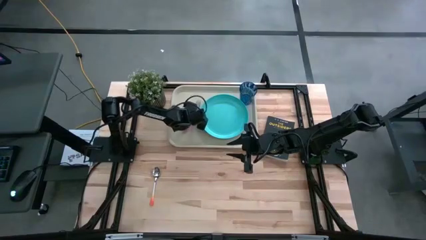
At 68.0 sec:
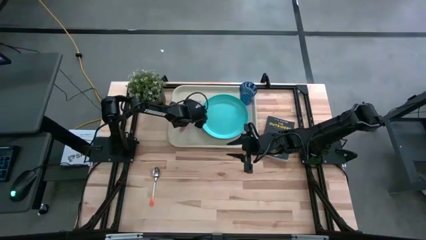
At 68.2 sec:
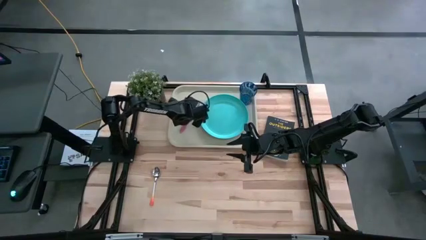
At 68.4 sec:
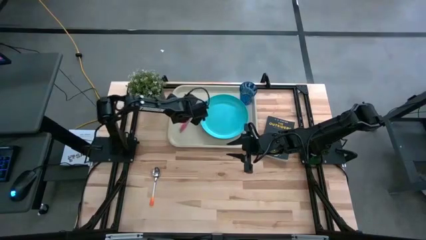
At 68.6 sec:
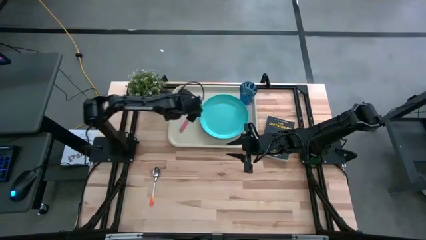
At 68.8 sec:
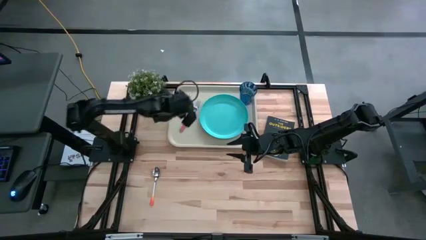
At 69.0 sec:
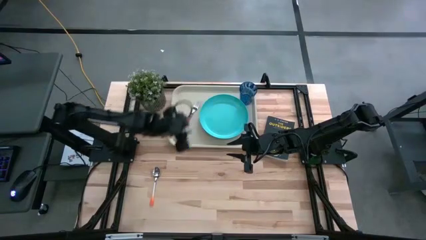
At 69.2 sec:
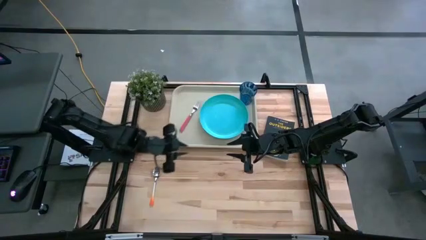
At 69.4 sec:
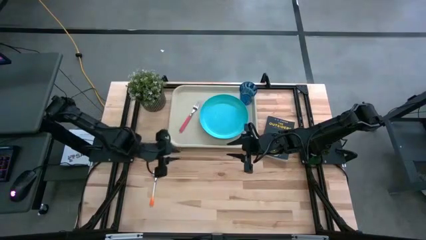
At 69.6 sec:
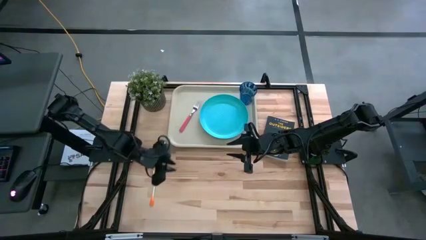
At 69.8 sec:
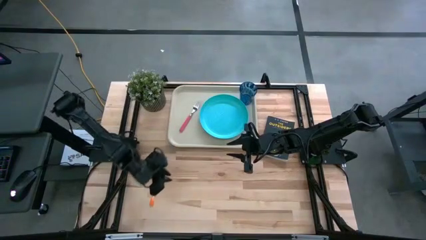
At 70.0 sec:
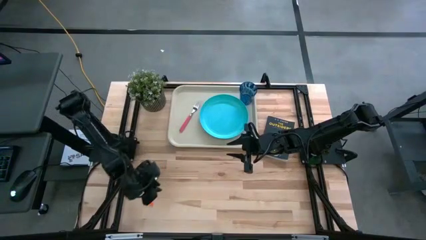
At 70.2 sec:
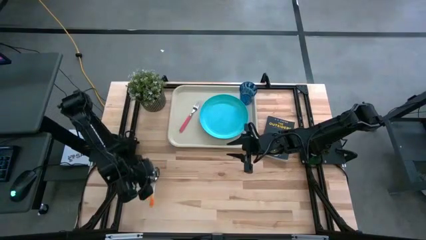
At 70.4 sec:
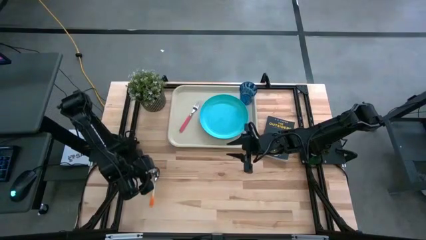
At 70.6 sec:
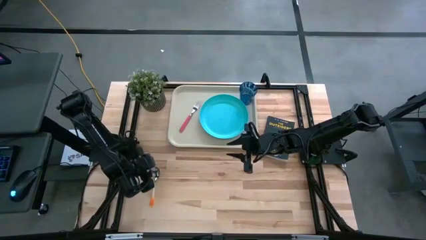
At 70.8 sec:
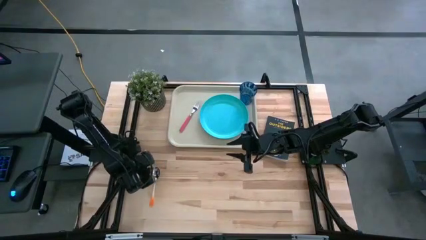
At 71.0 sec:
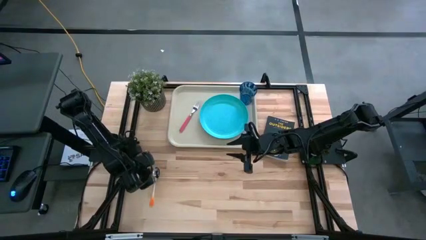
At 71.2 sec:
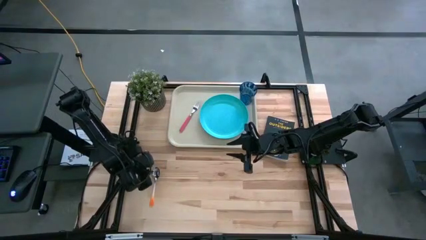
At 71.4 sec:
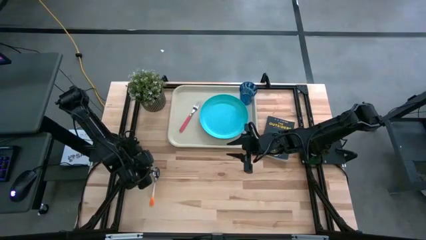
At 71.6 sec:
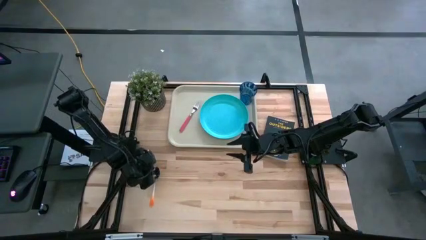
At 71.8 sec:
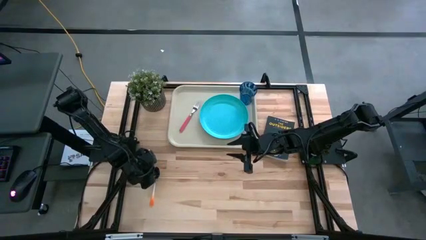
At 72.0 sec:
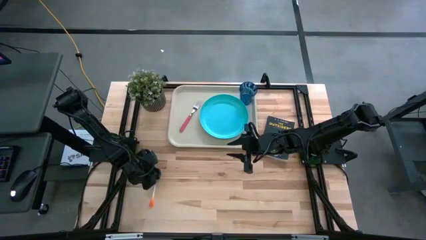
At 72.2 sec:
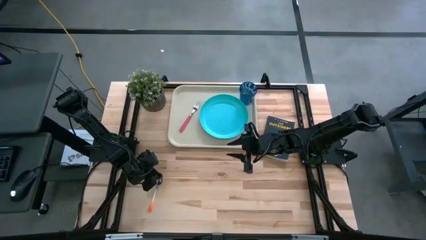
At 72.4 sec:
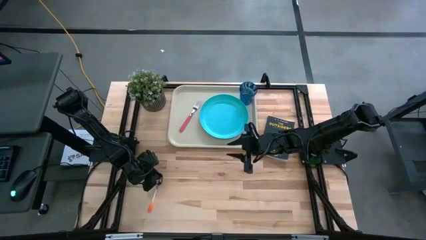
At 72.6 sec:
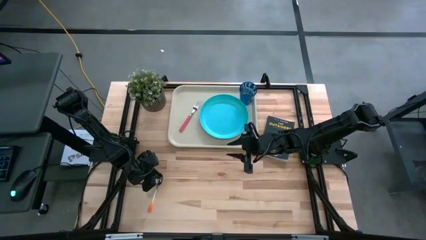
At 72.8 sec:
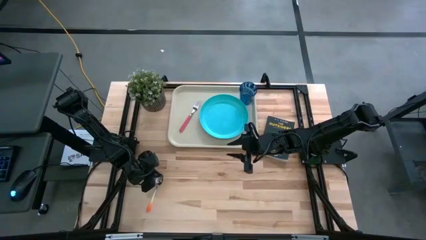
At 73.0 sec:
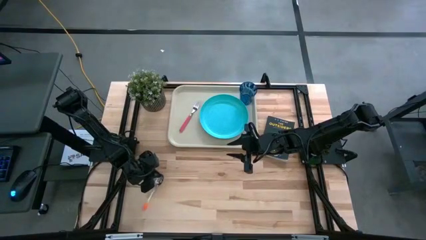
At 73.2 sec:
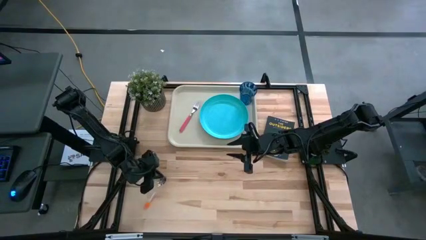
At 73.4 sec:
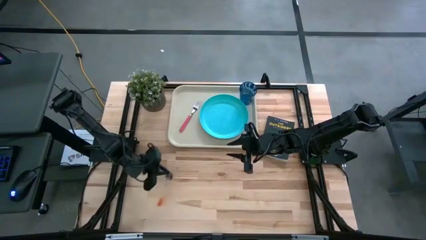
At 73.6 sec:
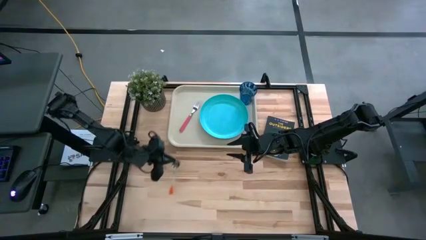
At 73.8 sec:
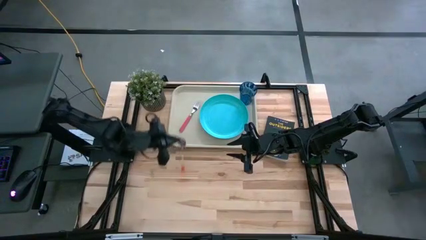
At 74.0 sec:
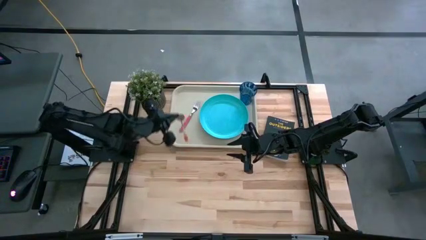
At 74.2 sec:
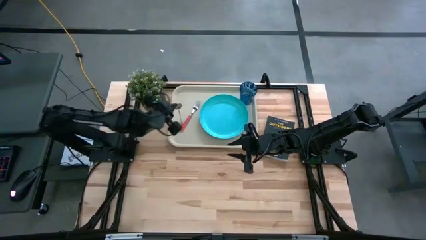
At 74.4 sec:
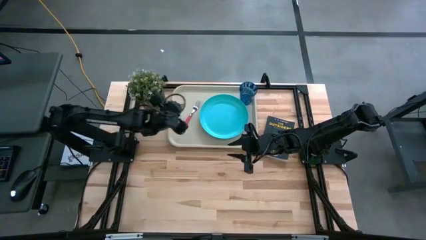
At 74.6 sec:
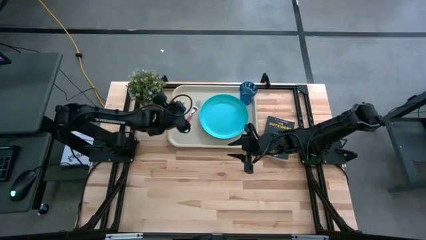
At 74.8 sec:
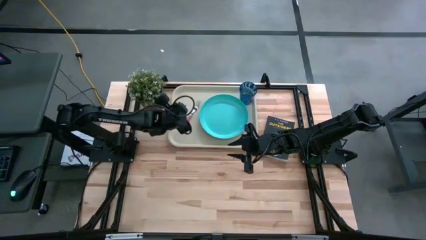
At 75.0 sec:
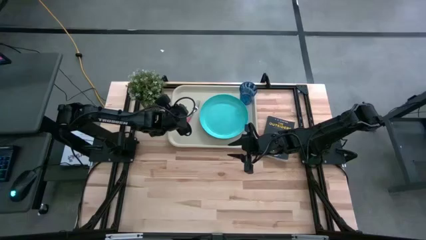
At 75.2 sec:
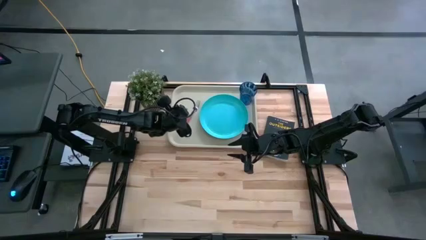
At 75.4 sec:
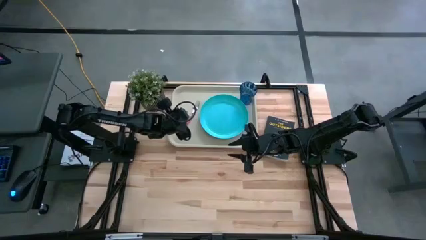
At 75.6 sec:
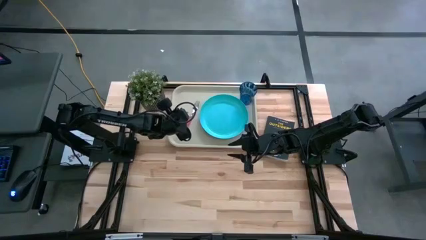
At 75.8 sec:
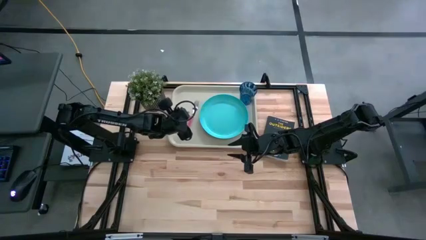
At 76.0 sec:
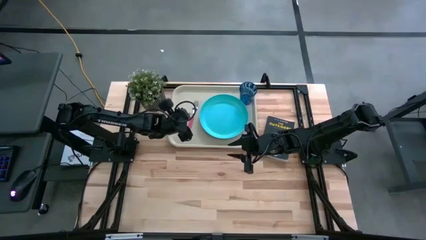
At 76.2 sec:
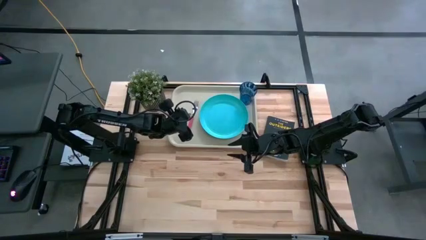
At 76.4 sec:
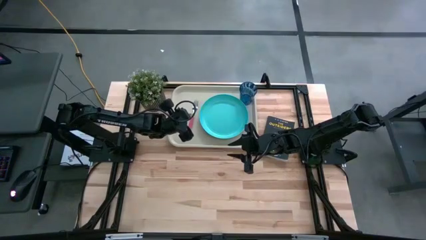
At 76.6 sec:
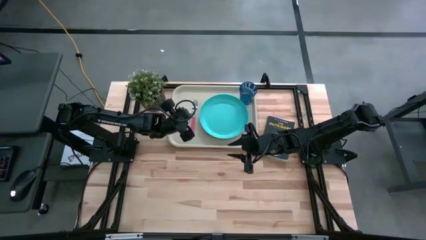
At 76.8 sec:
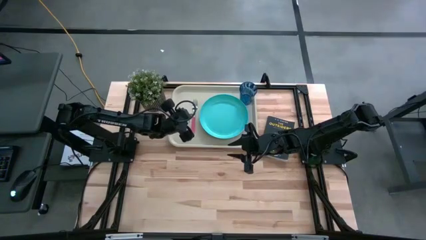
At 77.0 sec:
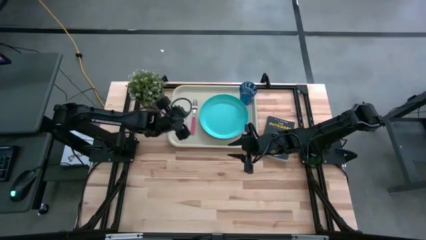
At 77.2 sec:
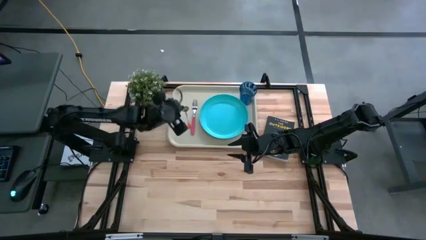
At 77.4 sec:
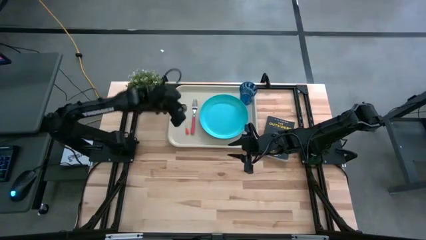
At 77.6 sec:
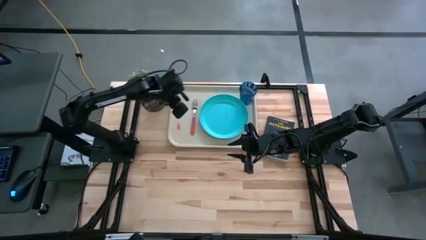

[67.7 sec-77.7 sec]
Task: Pick and place plate/cup/fork/spoon on tray
Put the orange spoon on the white serving tray to the left of the red fork

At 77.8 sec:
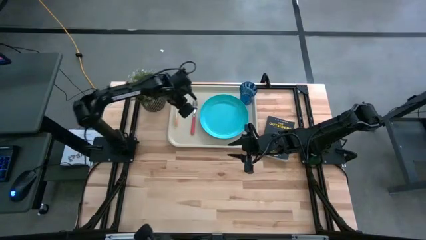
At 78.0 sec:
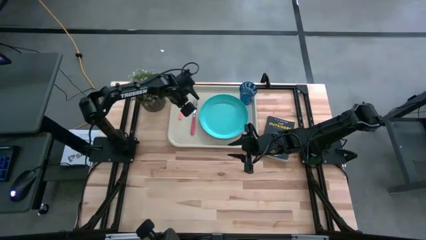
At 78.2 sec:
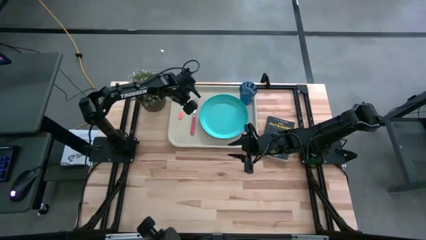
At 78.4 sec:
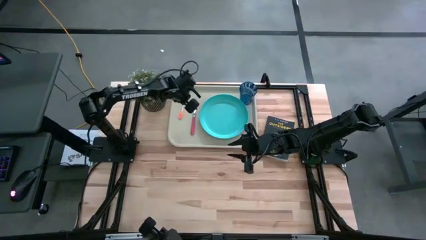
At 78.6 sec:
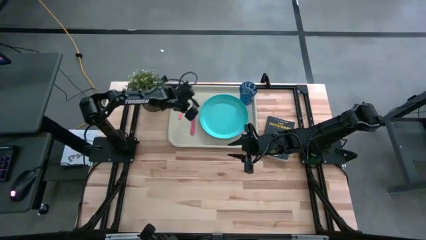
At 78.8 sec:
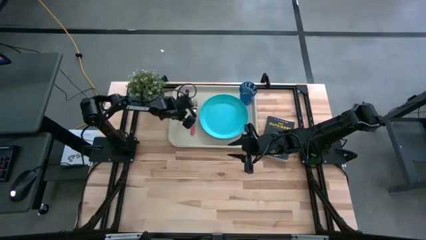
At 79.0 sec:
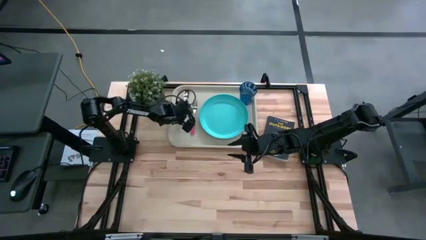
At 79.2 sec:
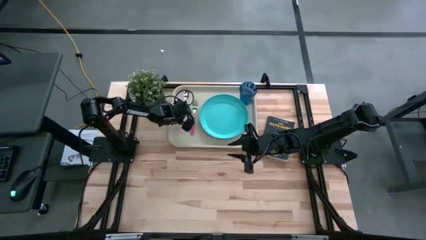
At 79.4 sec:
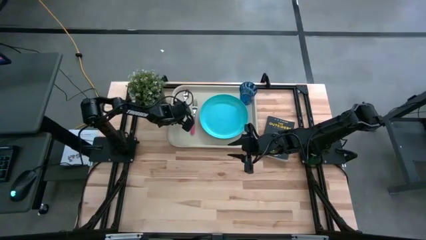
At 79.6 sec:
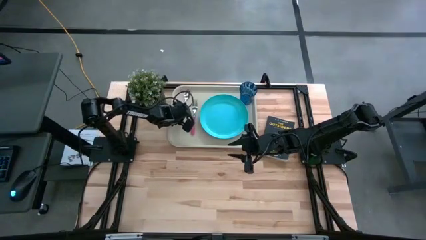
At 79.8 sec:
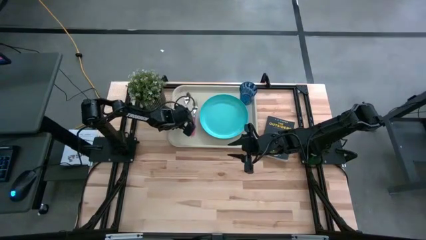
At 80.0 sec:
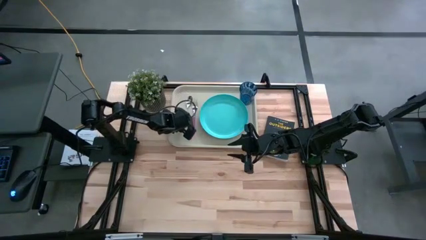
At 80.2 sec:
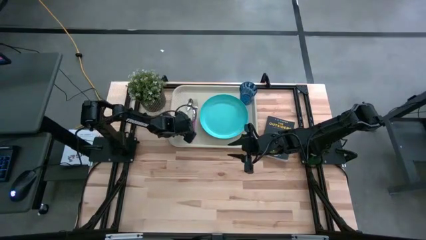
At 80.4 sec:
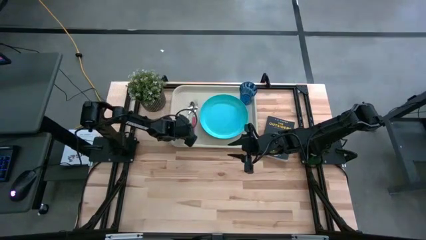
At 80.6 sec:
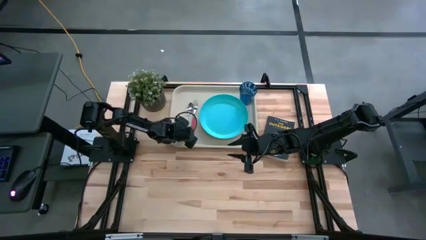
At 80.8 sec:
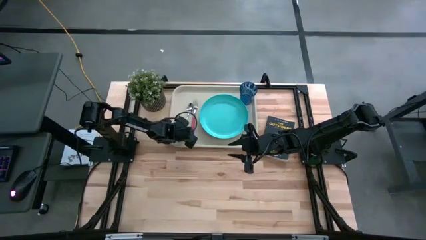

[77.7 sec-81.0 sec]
Put the orange spoon on the white serving tray to the left of the red fork
